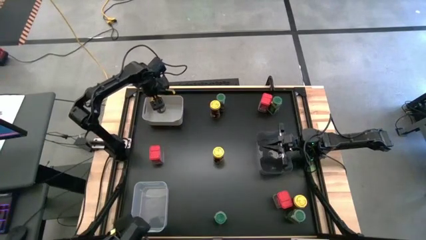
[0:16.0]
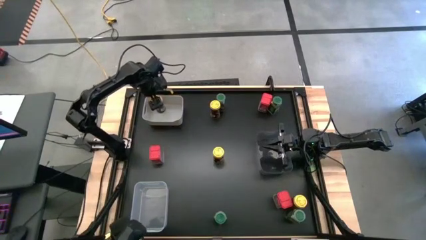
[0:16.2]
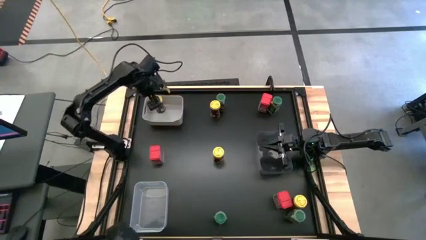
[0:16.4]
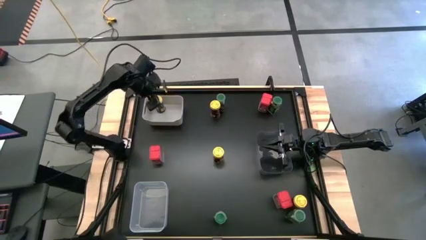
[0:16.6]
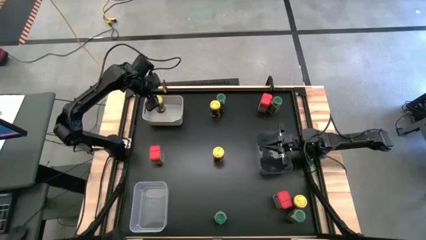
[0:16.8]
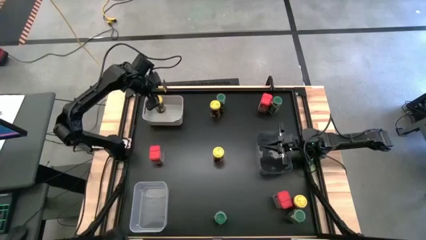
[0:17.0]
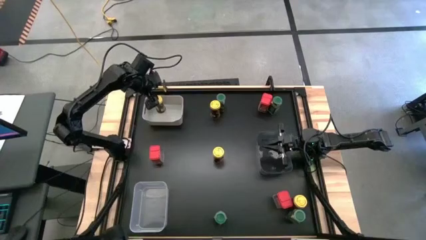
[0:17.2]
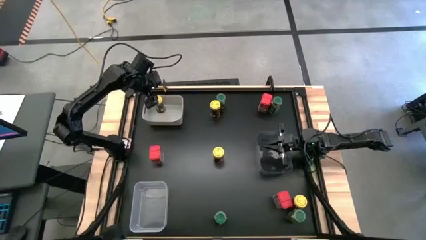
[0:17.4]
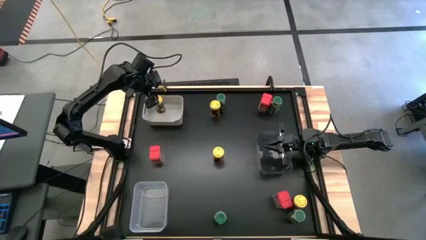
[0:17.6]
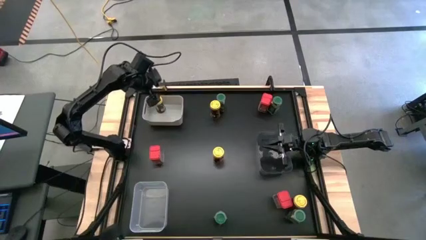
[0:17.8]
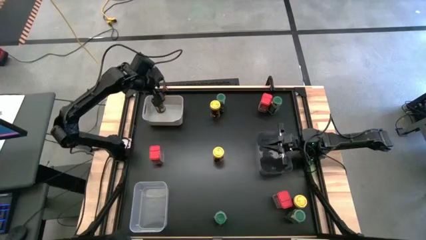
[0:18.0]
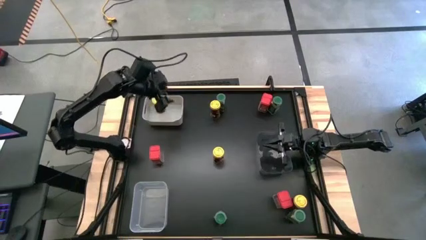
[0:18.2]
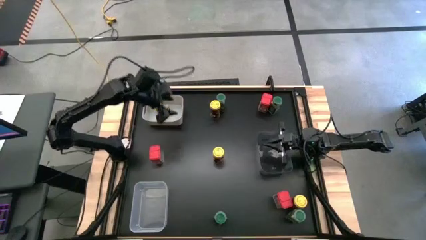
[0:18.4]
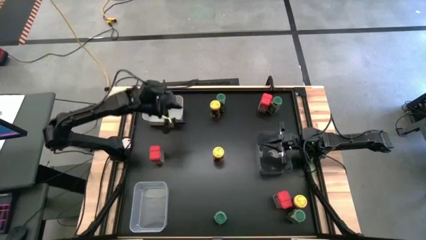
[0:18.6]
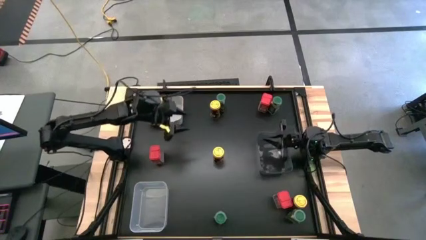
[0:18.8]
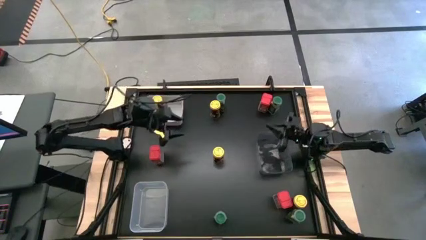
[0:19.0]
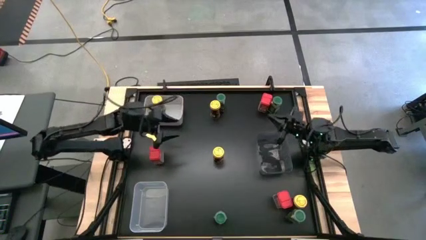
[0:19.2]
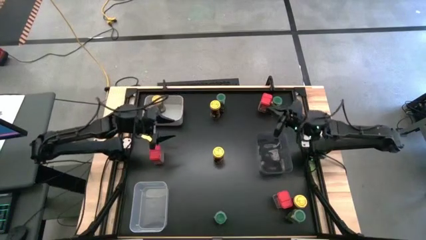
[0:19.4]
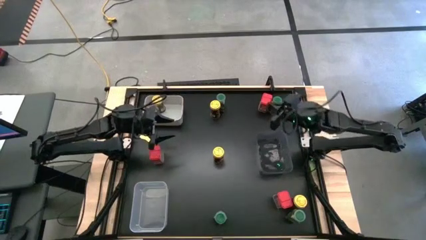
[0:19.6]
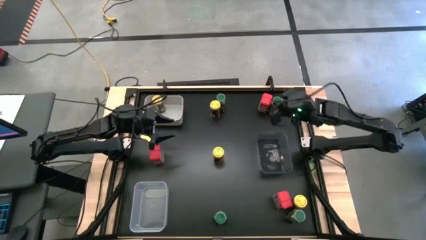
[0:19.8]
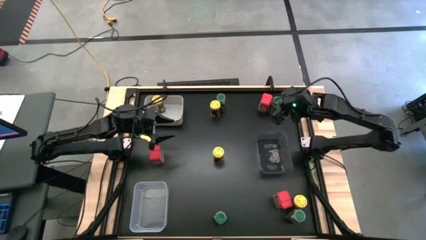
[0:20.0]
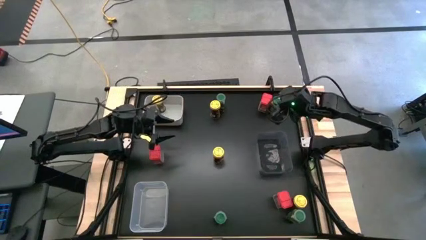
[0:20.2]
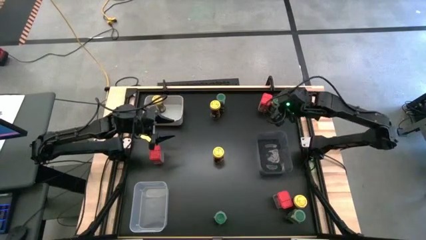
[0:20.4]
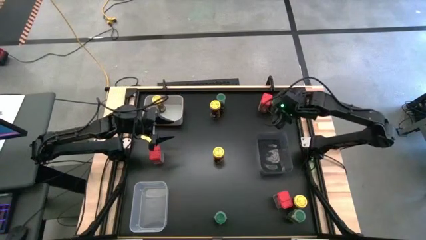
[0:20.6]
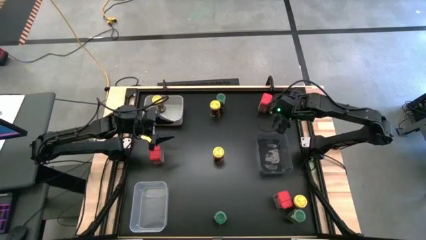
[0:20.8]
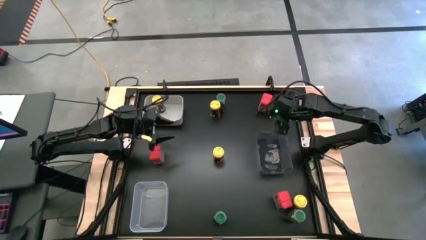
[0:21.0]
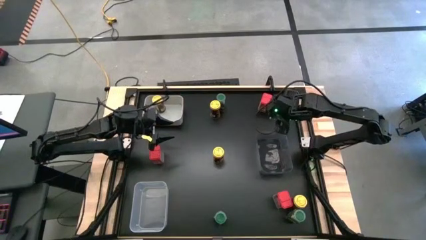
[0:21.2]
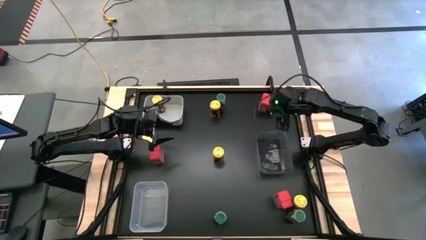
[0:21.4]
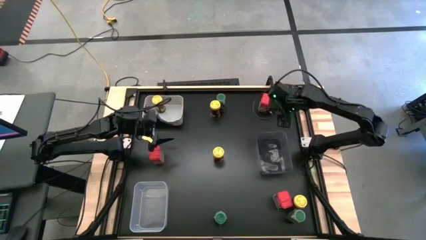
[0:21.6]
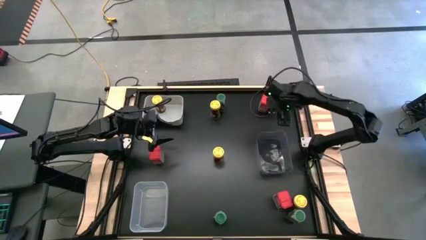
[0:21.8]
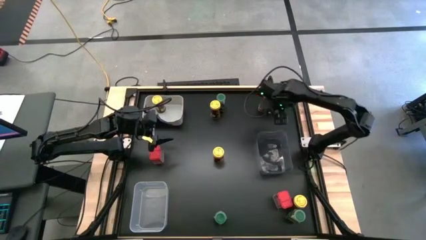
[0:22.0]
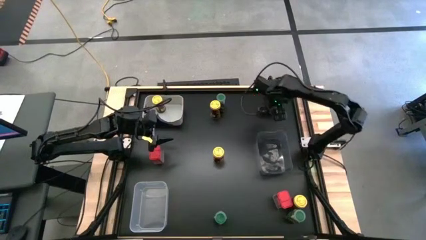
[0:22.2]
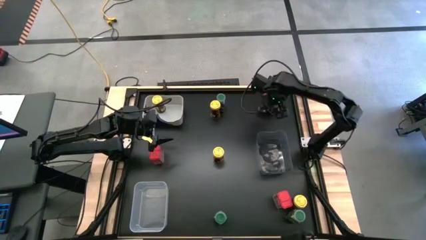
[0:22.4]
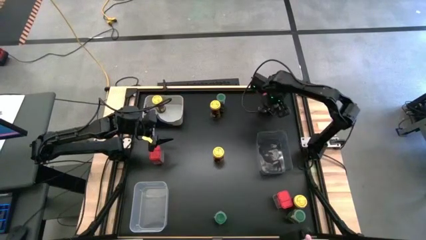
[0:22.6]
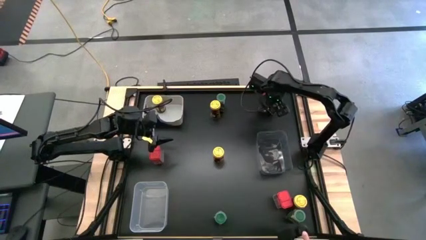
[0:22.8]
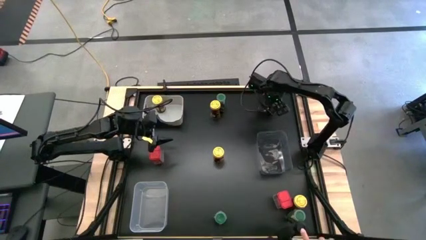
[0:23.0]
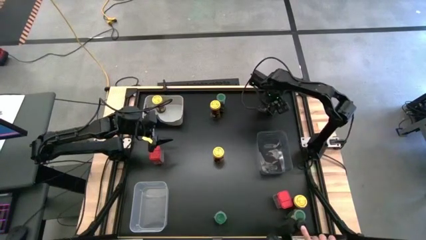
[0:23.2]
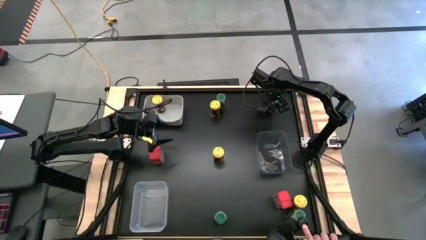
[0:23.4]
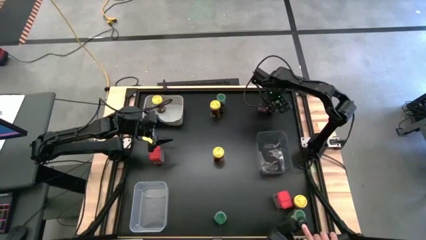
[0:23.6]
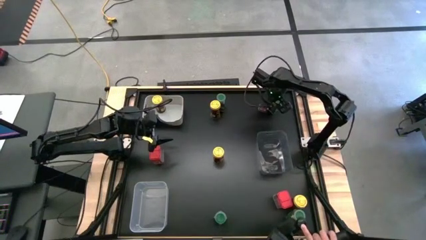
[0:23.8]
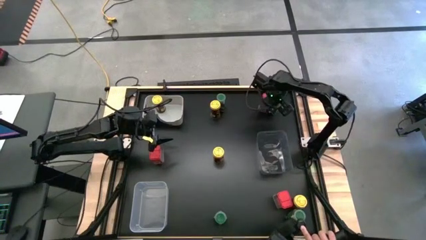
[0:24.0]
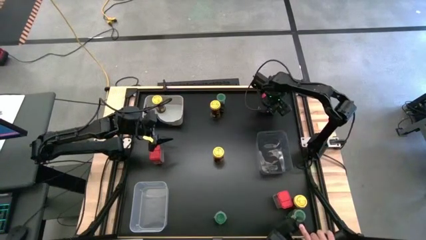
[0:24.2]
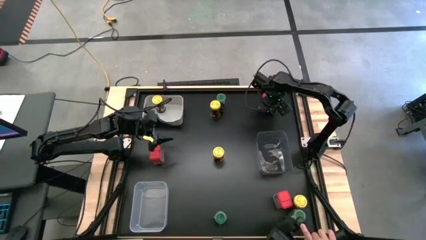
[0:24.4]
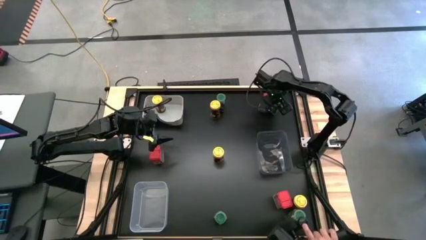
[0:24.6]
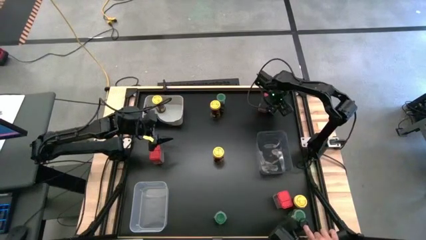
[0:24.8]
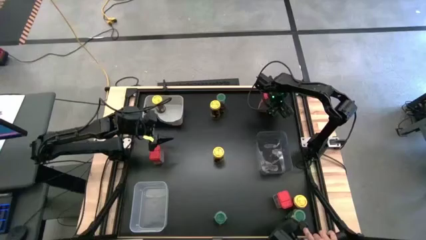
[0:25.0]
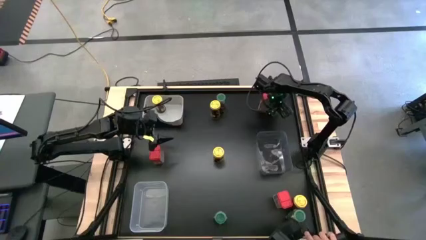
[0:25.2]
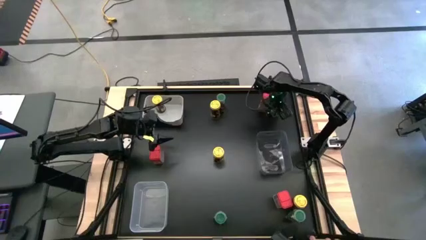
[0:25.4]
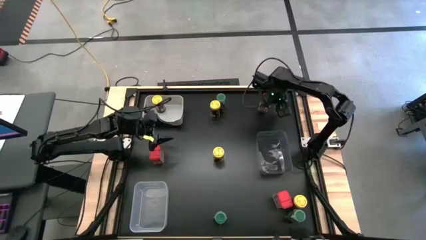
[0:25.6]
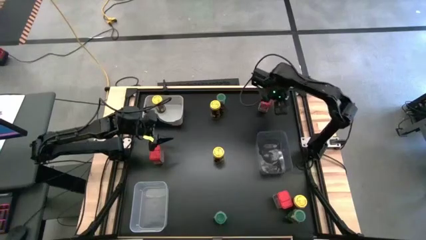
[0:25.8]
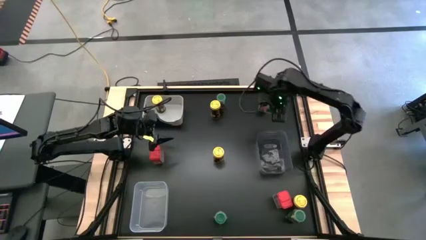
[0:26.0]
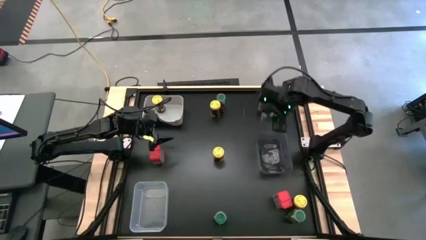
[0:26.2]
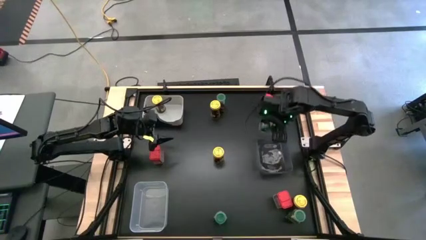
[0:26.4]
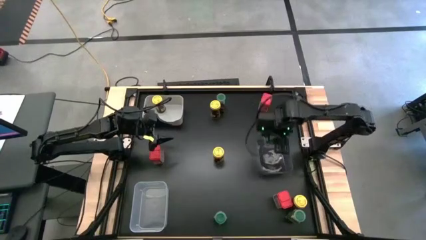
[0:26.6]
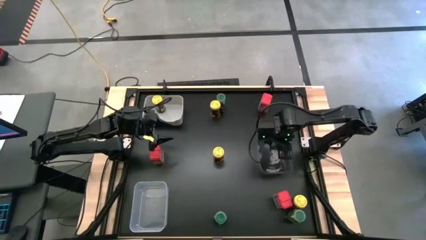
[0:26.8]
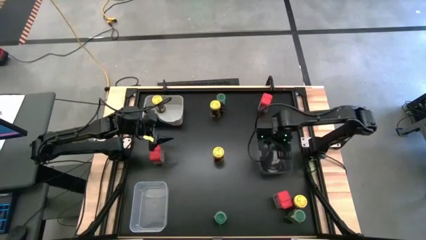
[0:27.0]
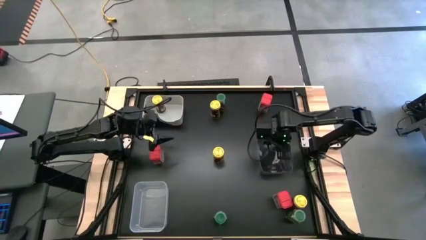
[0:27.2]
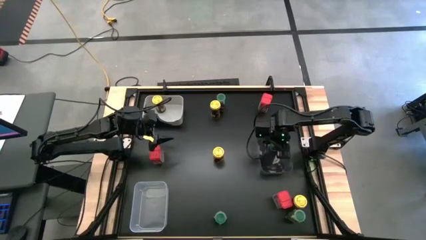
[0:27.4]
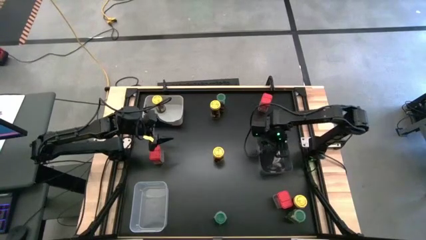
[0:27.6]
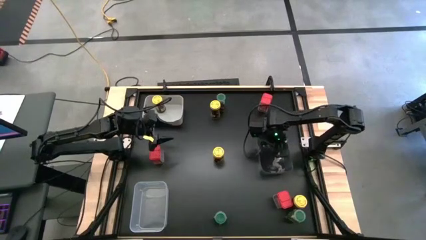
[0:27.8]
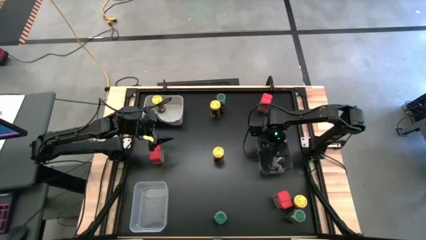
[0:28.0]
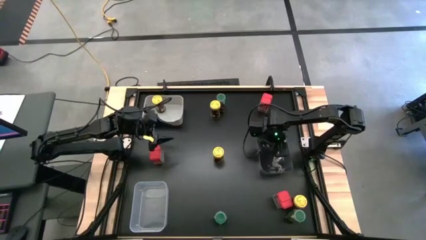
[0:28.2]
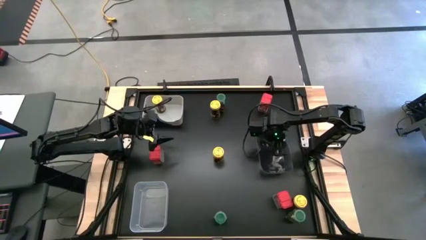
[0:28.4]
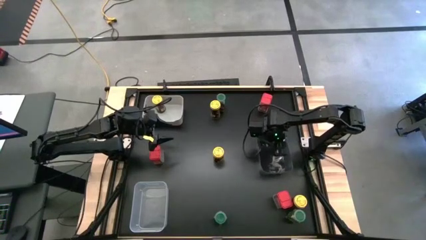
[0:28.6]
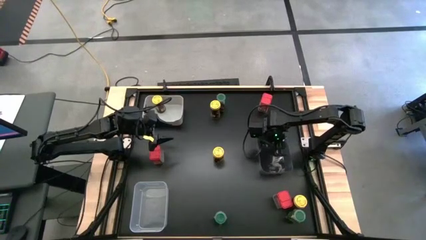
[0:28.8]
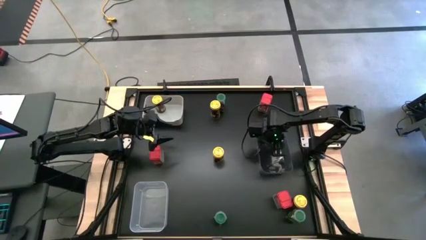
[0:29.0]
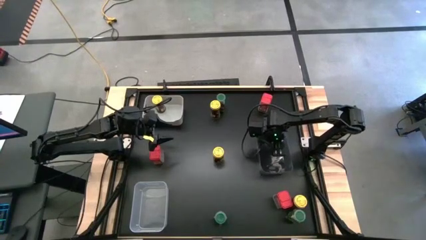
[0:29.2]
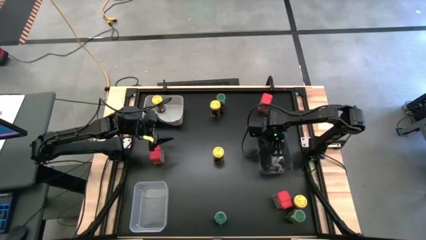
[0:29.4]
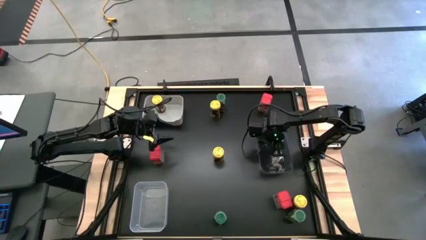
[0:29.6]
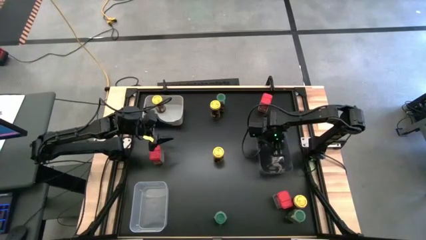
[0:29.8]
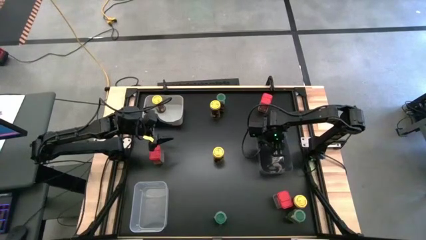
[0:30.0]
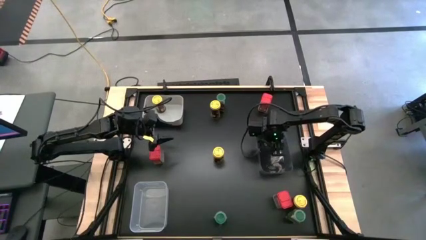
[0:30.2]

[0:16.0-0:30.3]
Task: Sort spices by type
Put the top right green seasoning bottle into the black bin
